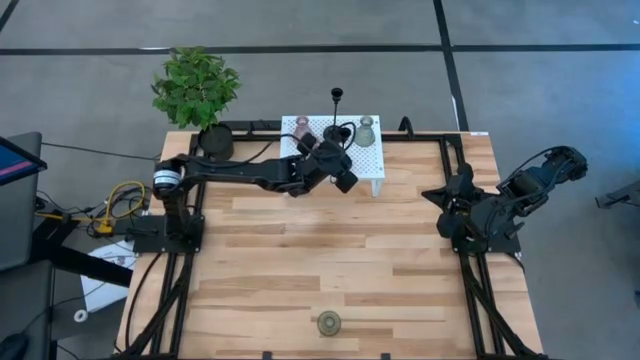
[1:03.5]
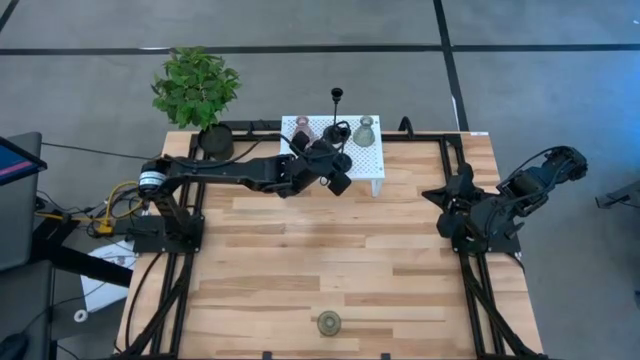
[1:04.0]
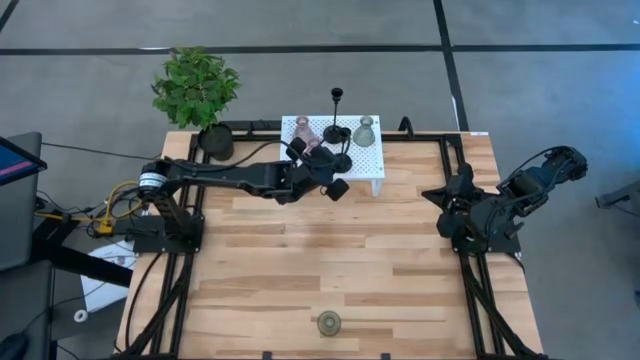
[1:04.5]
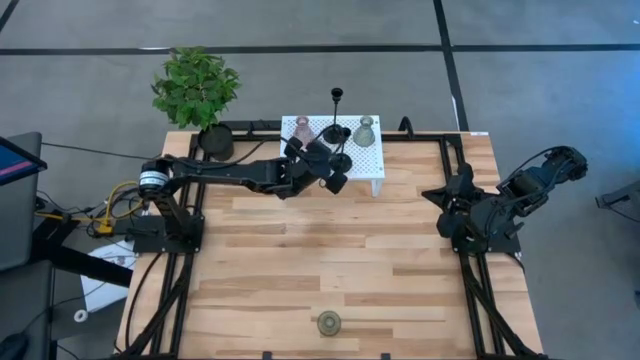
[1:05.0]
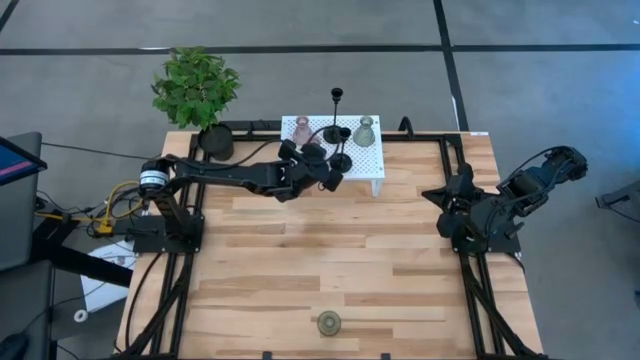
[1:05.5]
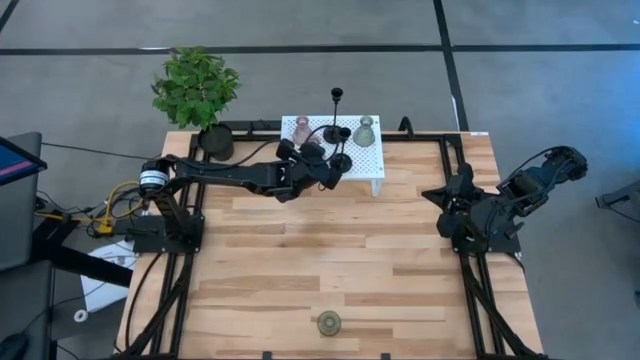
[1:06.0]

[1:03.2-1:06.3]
Task: Pick & Place candle stick holders
Adjust the bottom pink candle holder

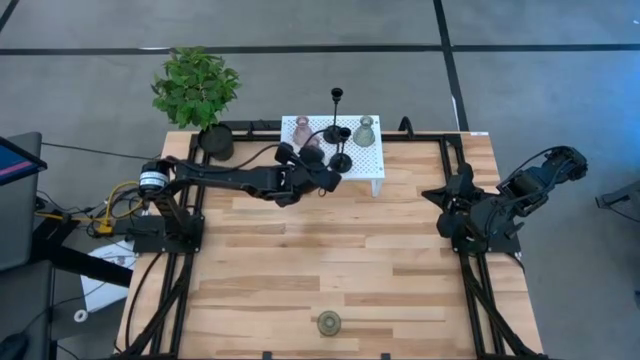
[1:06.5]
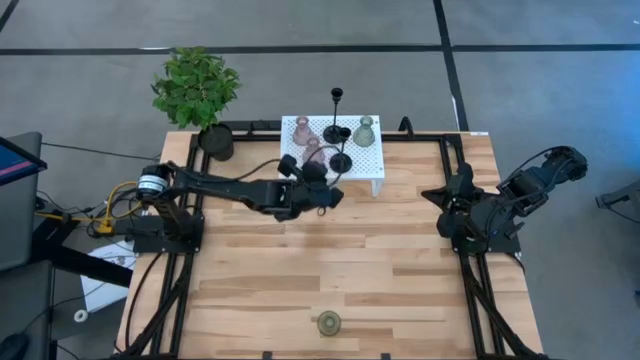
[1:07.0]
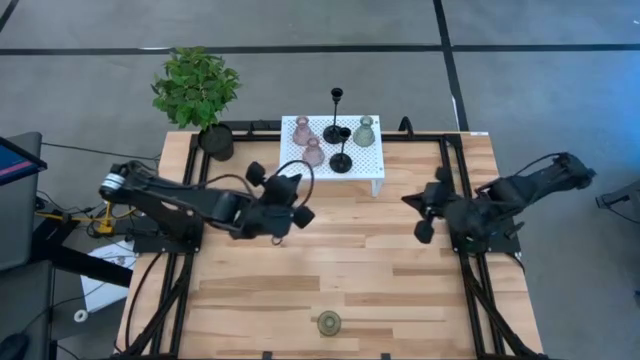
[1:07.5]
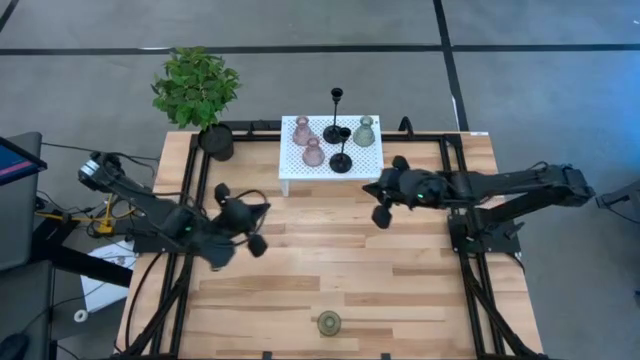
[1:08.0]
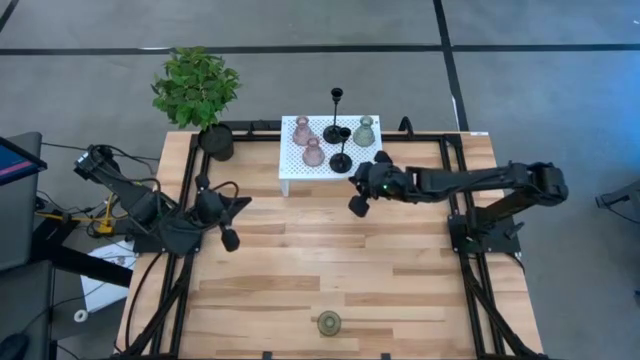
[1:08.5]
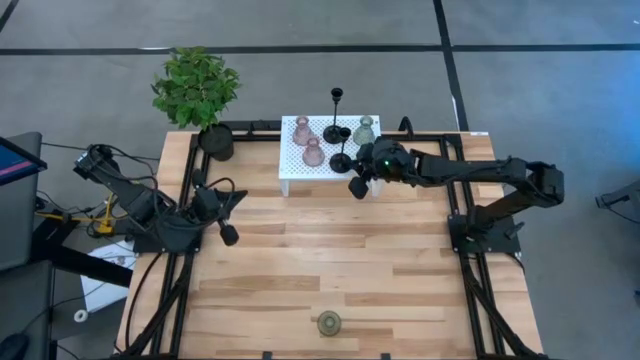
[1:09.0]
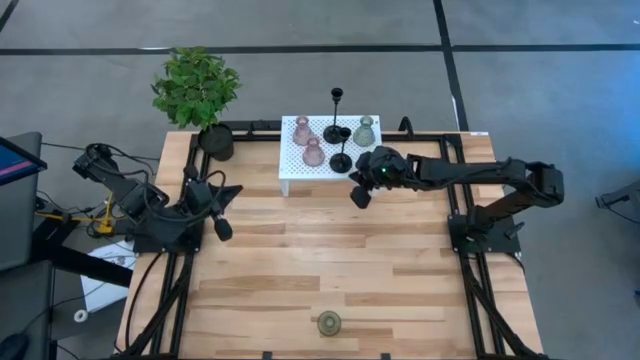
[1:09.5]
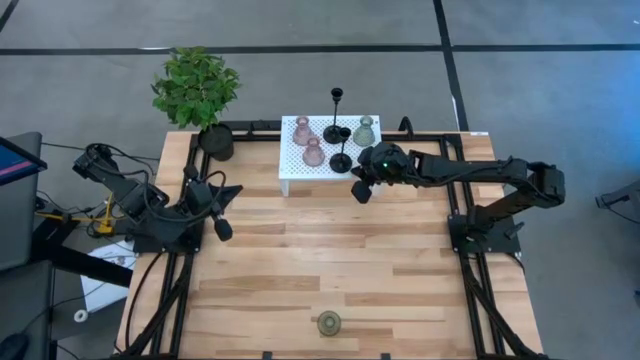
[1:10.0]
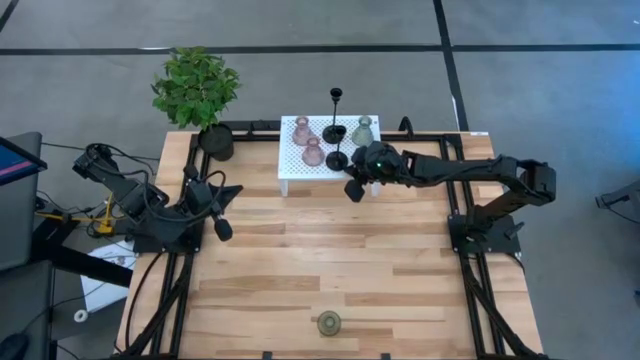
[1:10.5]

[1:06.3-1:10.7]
Adjust the bottom black candle holder

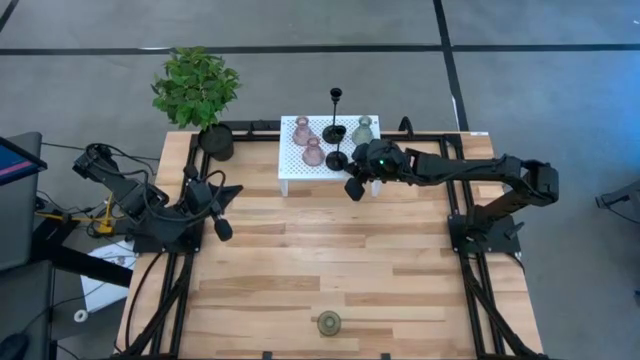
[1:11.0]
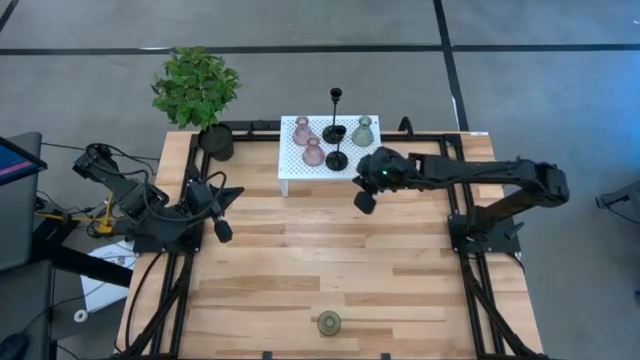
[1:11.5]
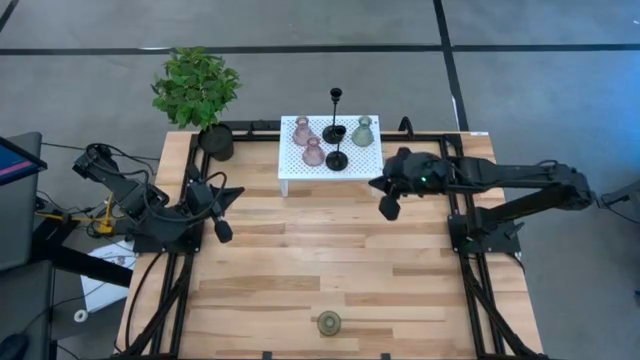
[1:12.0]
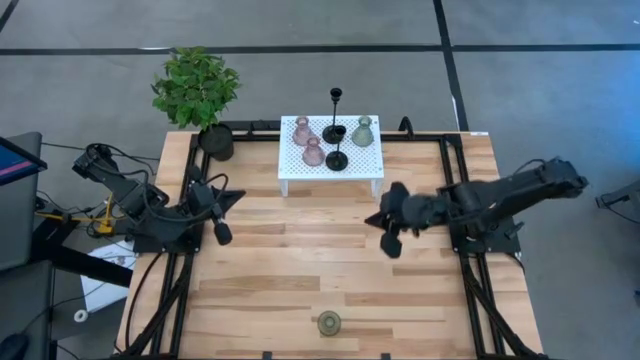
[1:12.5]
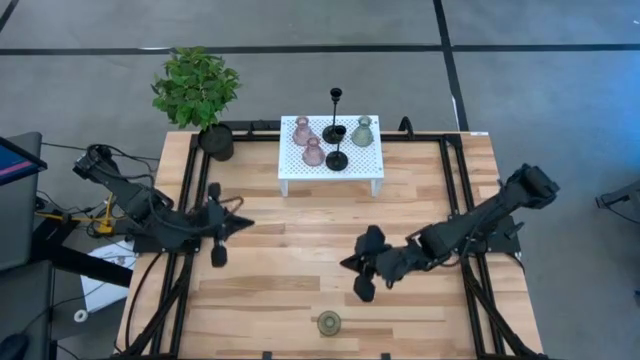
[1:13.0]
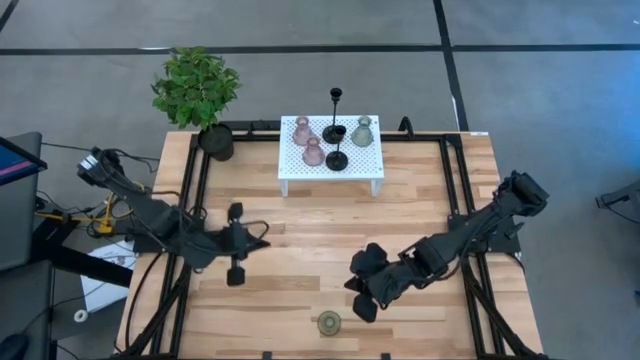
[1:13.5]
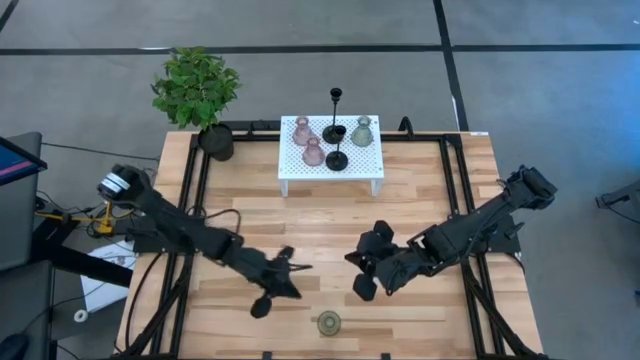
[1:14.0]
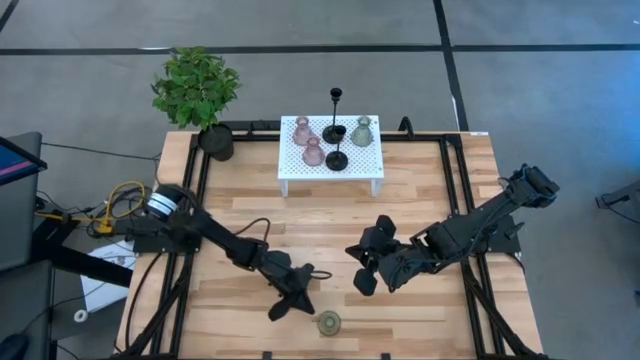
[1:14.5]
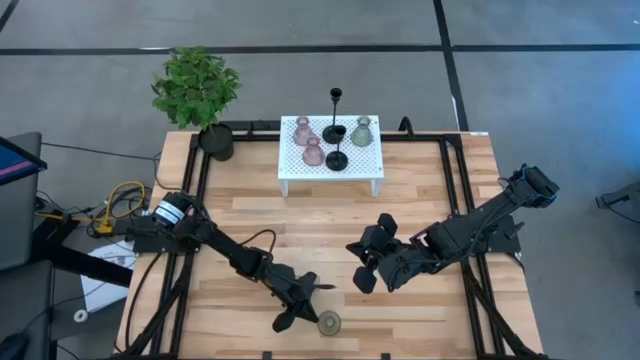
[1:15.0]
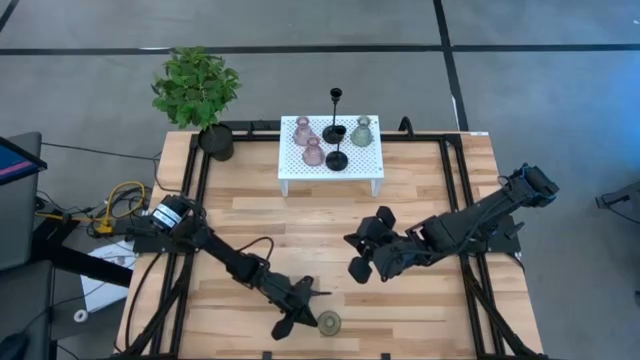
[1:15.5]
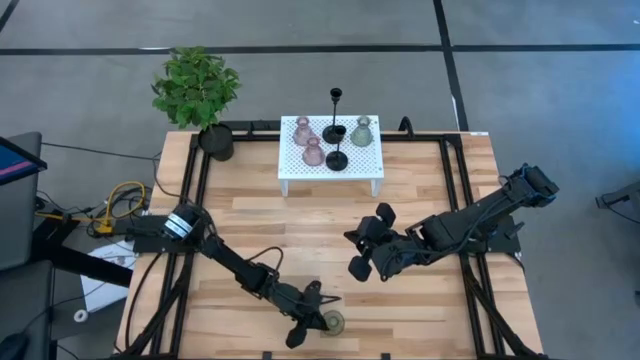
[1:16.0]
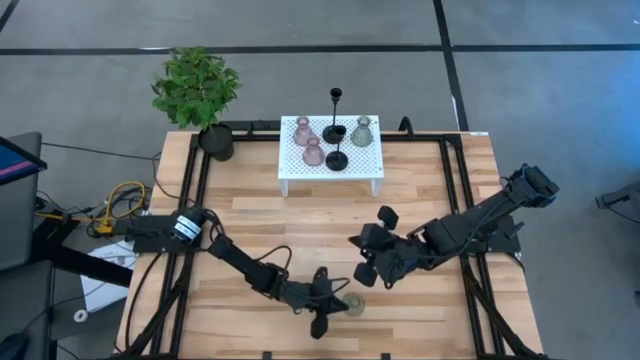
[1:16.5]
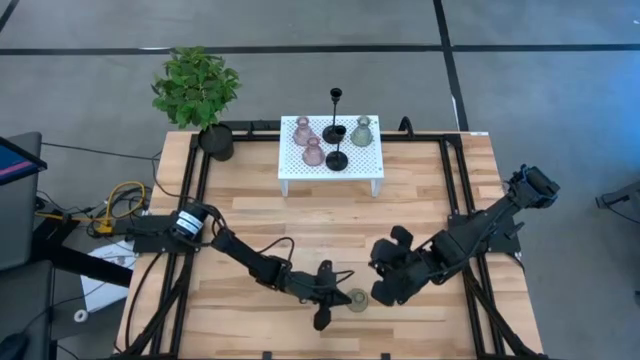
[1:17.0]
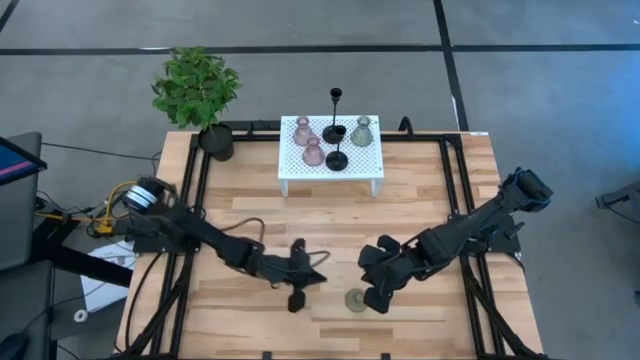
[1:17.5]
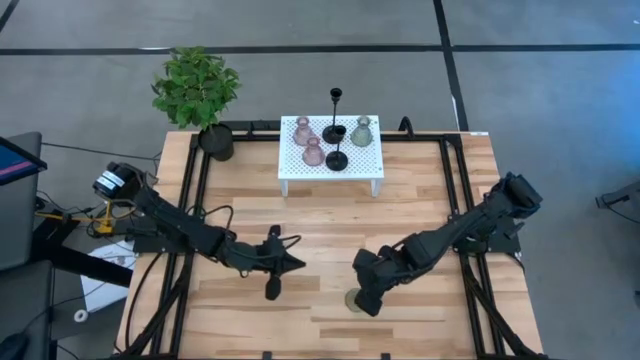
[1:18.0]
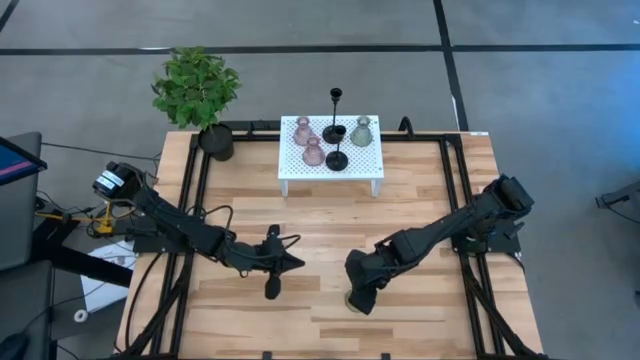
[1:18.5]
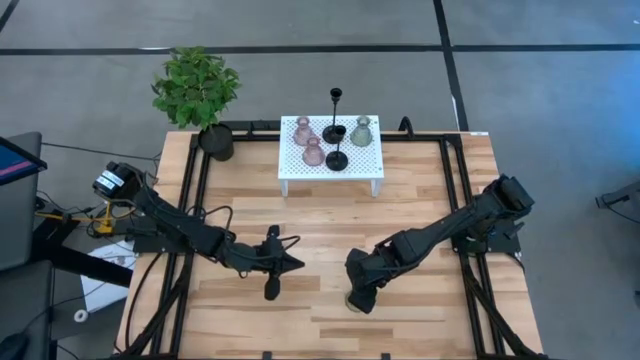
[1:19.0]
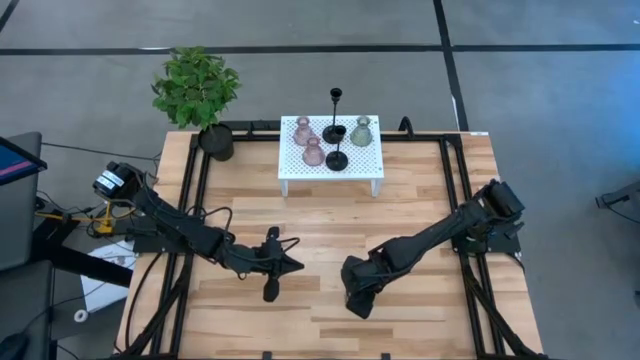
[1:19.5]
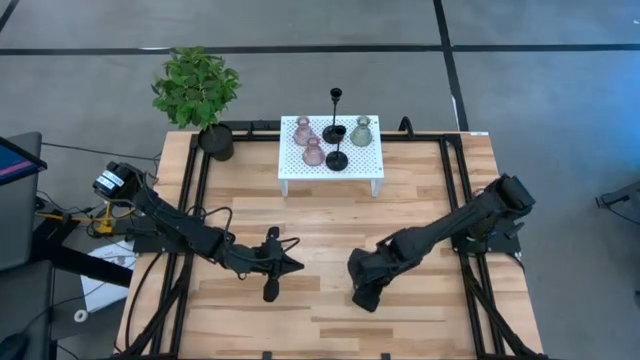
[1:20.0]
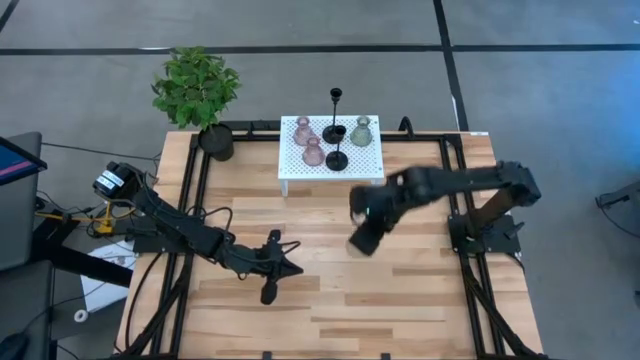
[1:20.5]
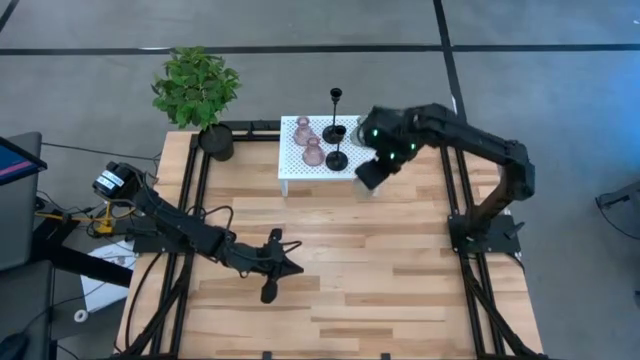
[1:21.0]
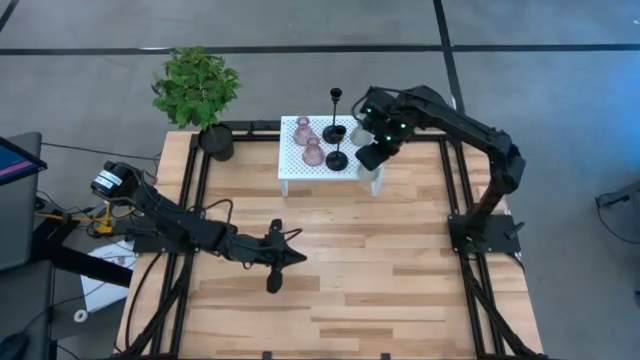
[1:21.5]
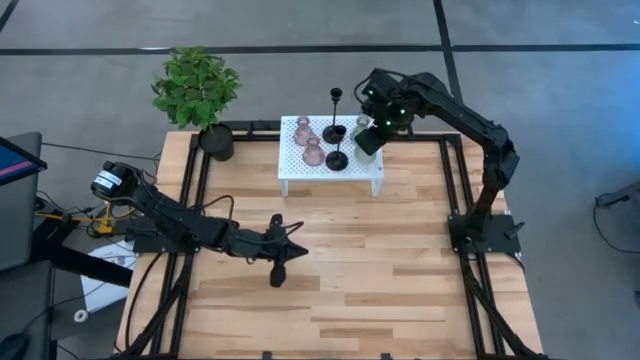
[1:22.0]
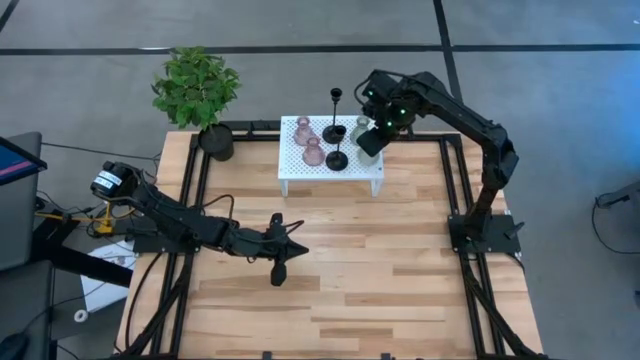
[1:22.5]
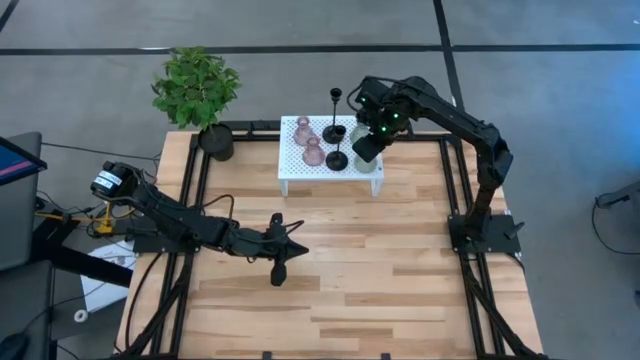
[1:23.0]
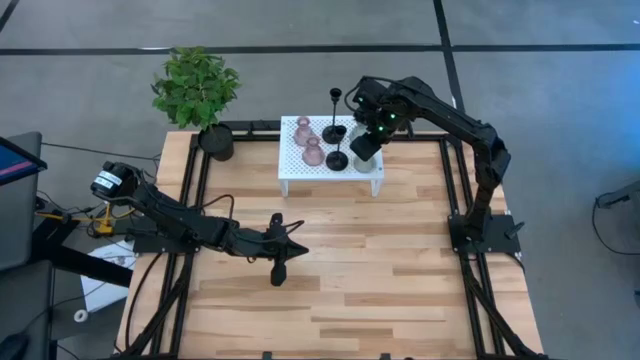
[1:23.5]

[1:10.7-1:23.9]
Put the green candle holder on the shelf
